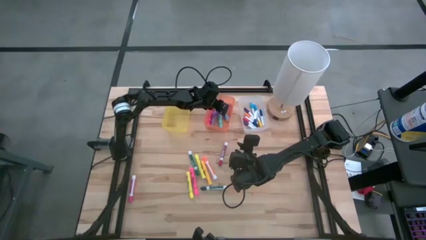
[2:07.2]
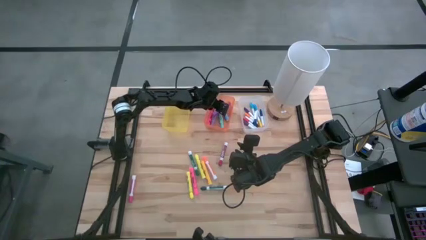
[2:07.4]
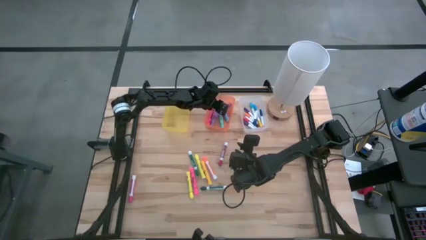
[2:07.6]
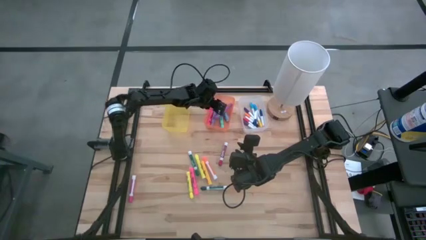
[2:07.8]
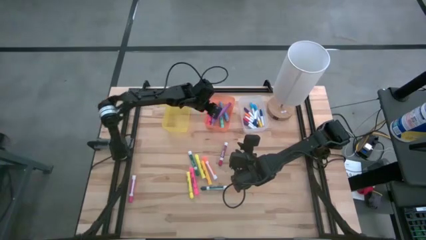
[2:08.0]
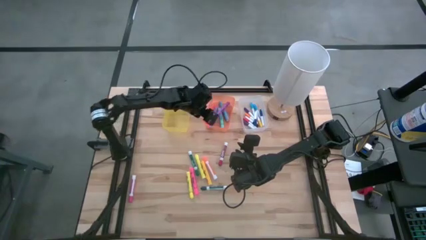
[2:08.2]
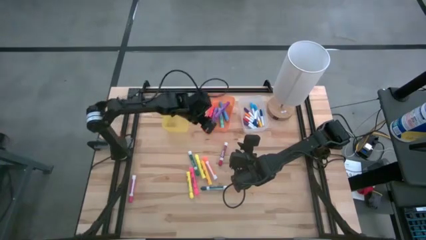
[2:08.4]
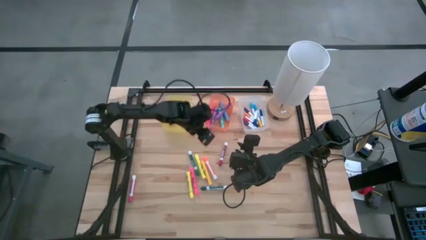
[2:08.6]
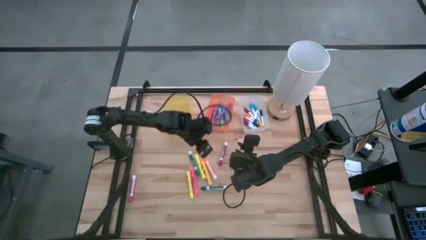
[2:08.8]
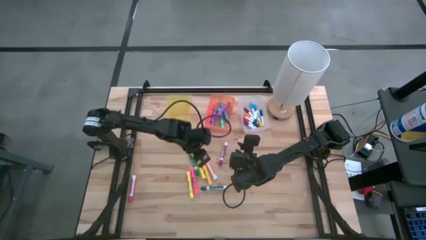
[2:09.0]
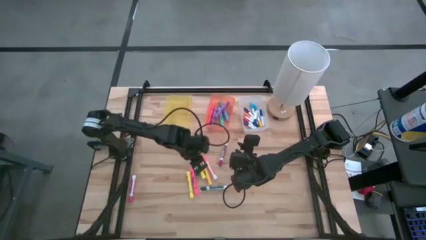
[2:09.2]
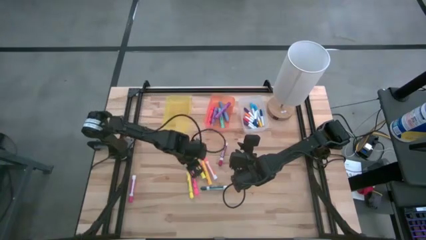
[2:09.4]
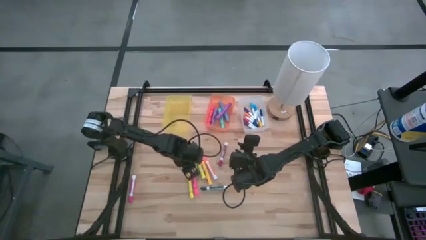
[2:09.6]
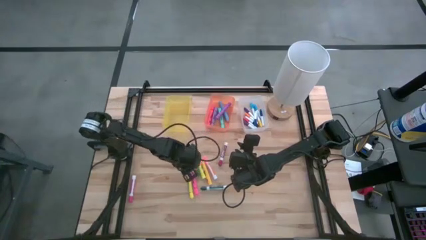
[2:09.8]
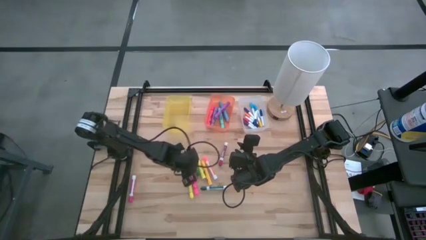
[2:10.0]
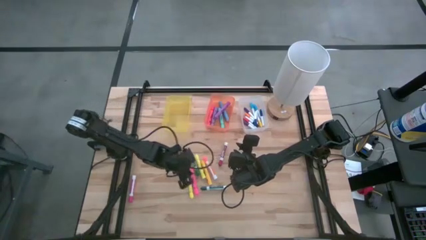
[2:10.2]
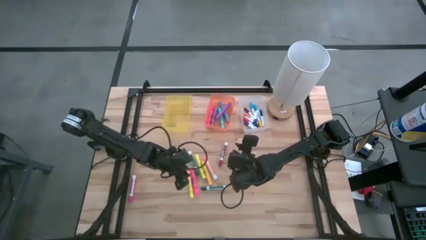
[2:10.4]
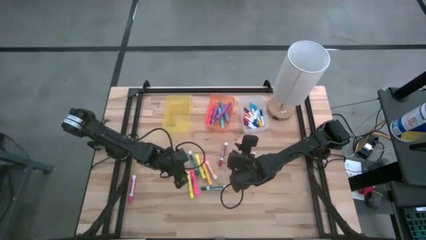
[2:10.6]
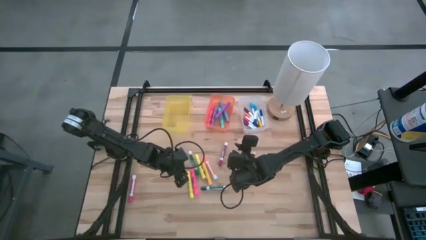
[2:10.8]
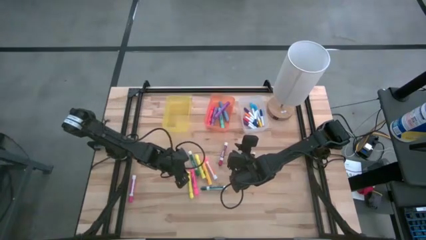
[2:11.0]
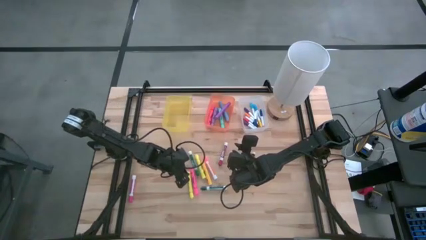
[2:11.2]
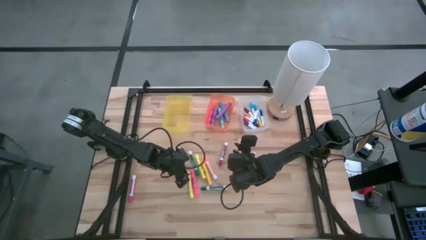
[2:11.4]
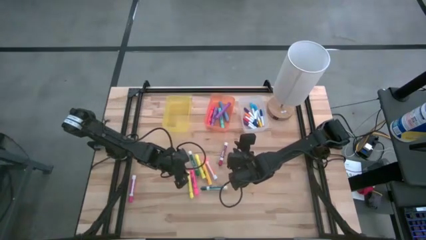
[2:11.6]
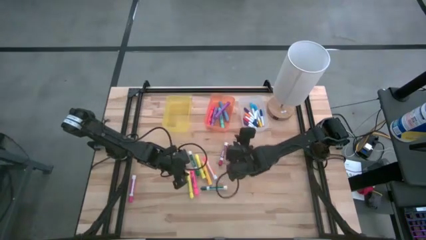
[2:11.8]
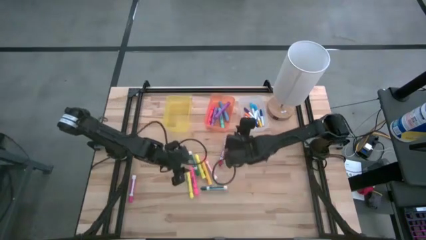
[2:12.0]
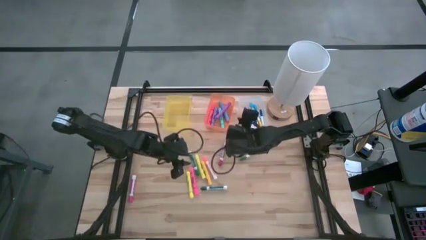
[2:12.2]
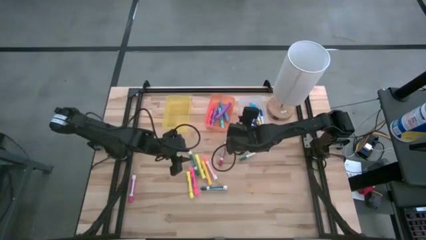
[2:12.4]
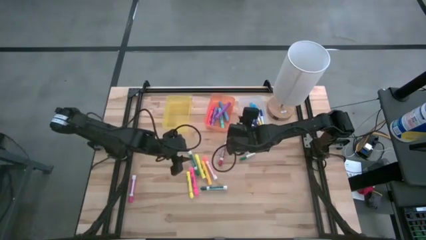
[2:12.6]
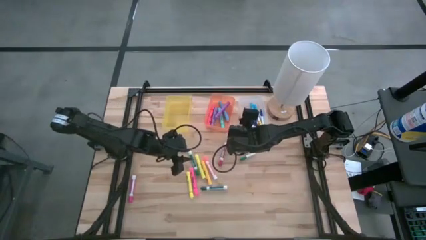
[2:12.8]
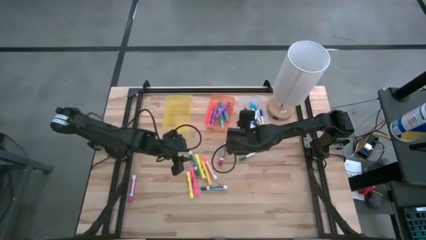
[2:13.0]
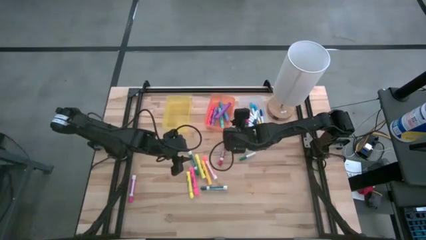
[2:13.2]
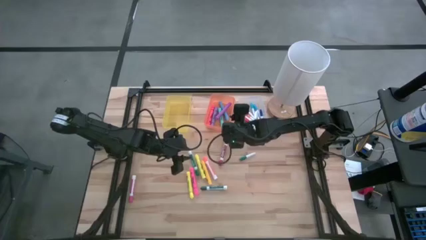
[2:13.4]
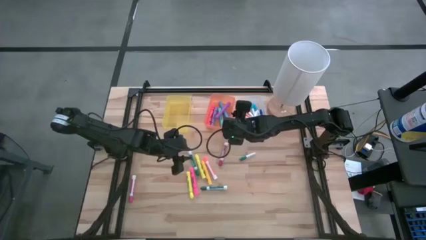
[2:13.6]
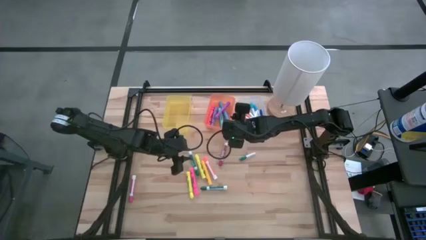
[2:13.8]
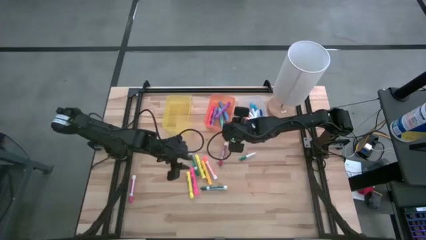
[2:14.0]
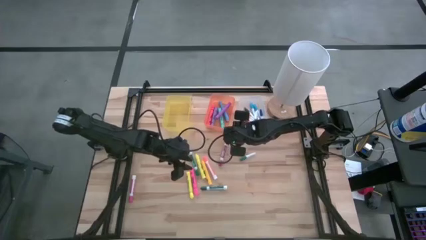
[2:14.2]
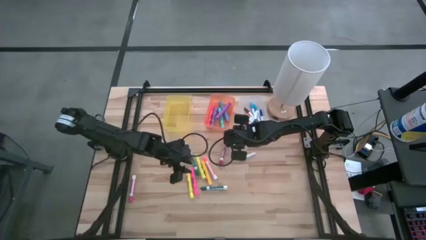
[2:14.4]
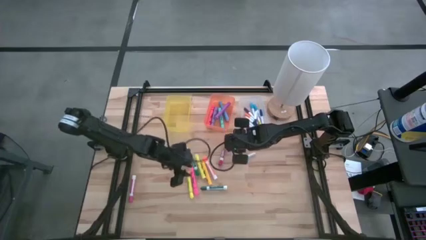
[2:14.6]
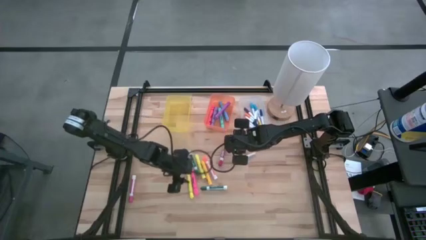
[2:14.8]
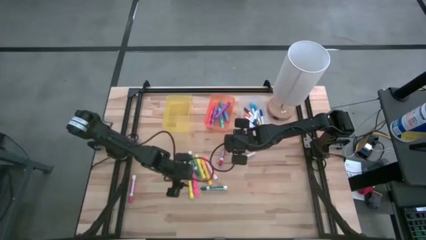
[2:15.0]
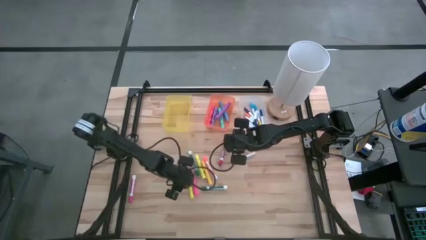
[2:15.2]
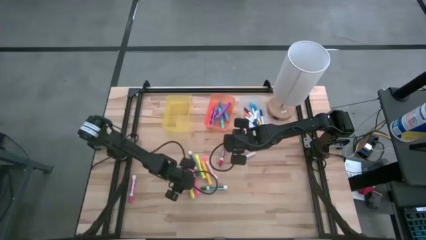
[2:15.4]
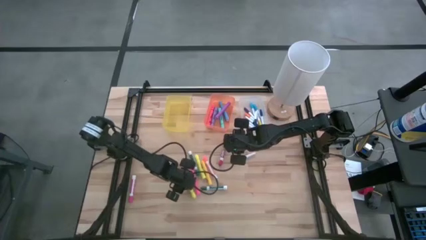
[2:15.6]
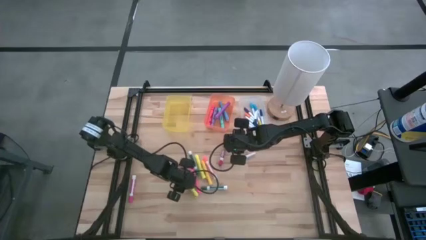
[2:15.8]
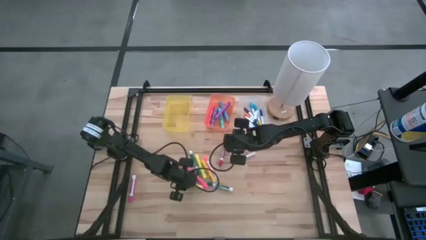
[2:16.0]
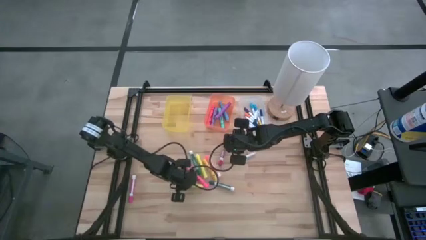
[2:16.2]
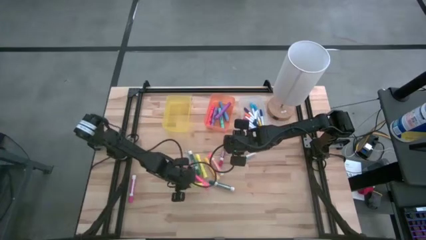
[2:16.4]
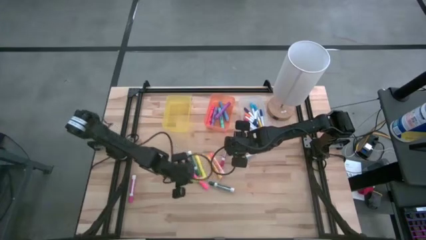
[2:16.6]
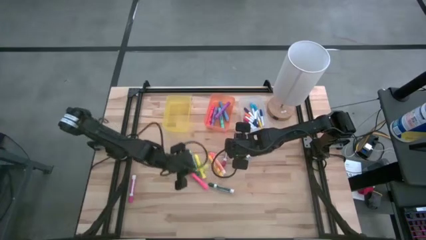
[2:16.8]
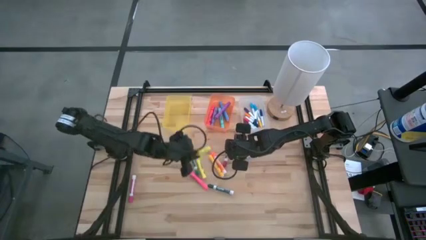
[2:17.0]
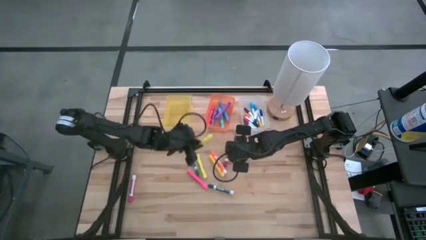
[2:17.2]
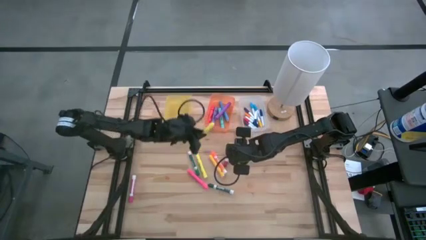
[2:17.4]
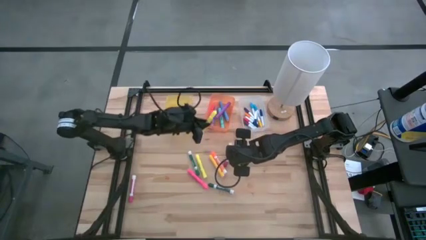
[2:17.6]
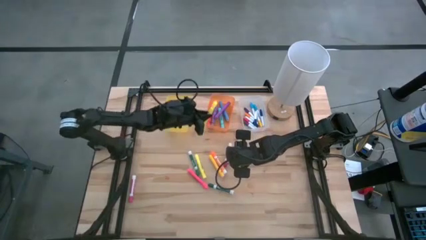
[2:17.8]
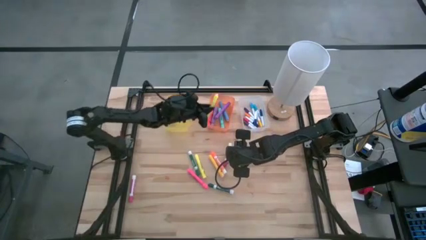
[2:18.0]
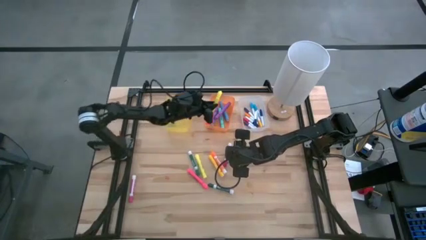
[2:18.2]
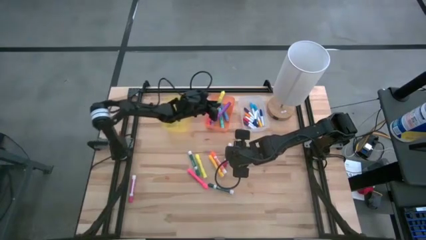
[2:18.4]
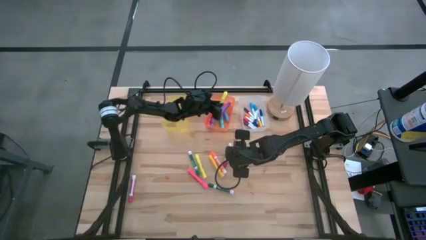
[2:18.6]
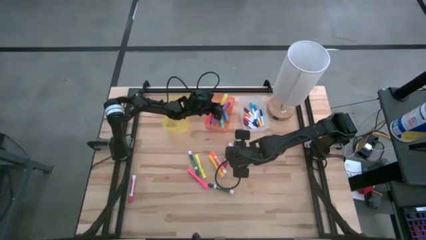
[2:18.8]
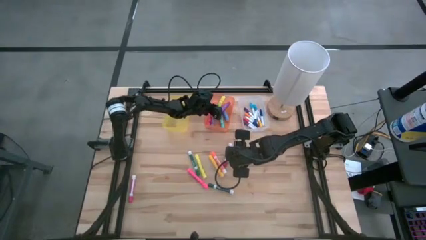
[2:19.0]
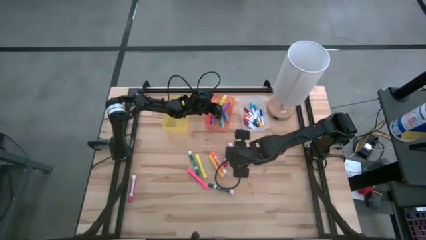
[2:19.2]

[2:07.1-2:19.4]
Task: Pick & Place Markers
Put the left yellow highlighter into the orange bin

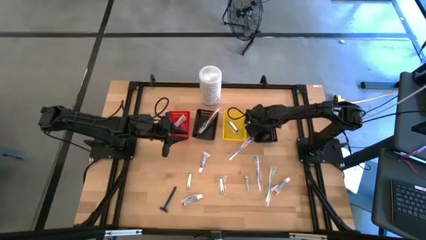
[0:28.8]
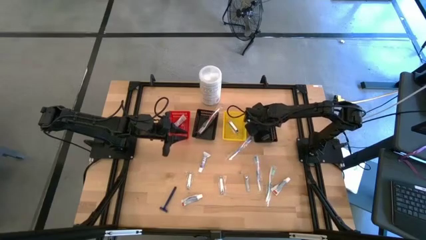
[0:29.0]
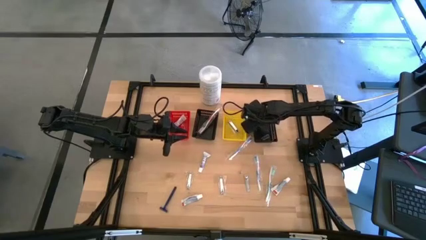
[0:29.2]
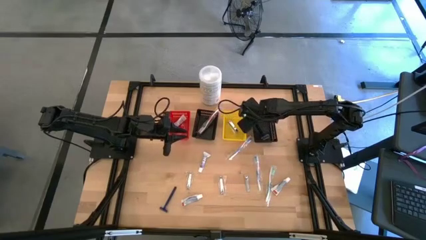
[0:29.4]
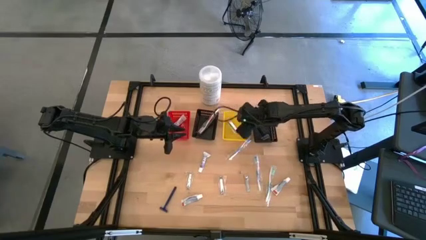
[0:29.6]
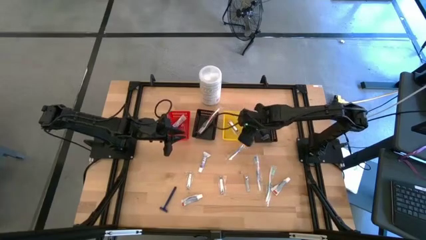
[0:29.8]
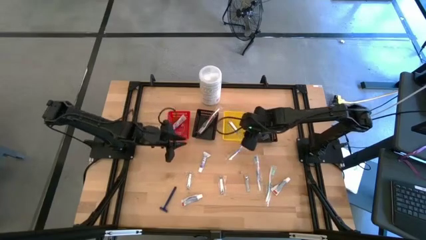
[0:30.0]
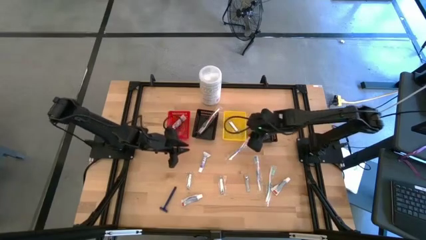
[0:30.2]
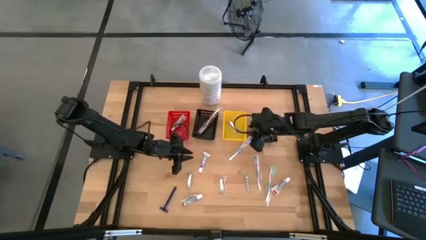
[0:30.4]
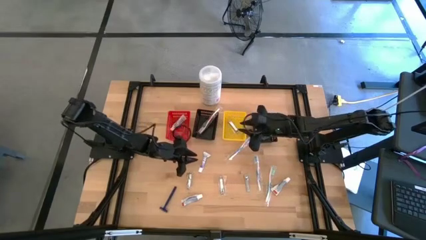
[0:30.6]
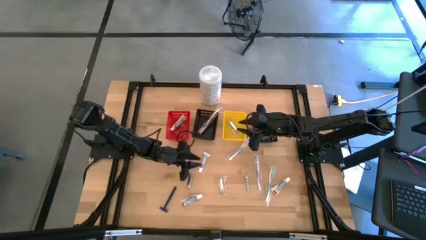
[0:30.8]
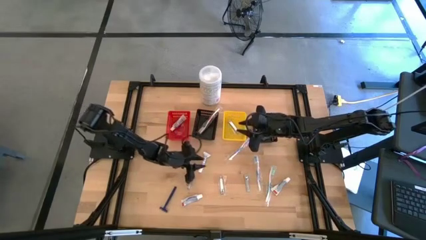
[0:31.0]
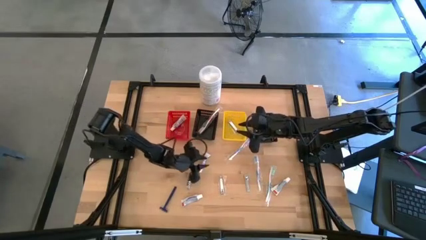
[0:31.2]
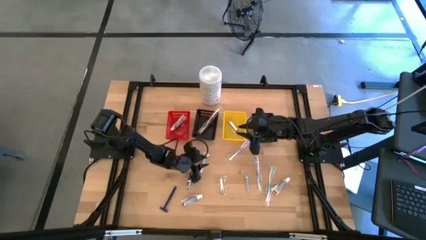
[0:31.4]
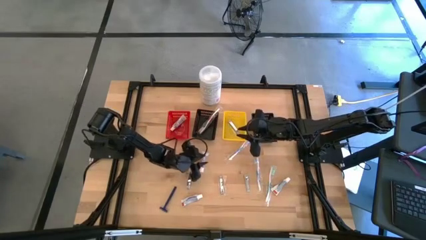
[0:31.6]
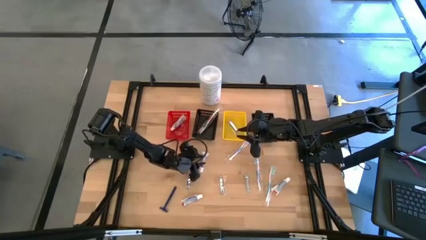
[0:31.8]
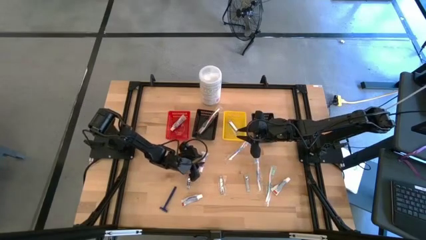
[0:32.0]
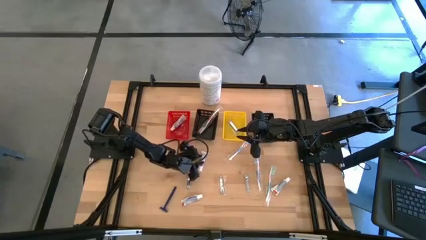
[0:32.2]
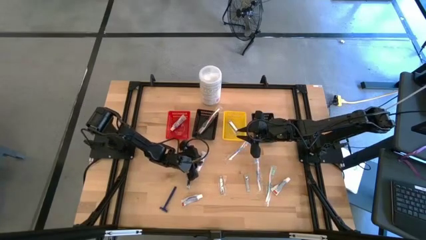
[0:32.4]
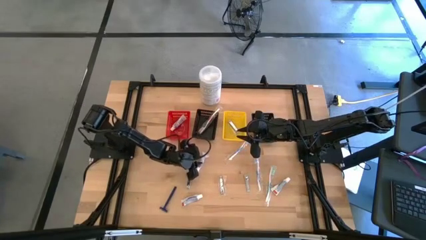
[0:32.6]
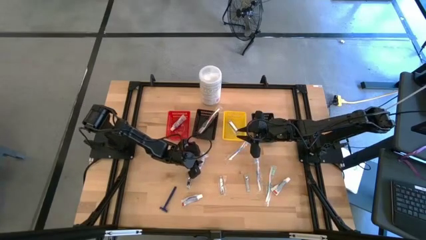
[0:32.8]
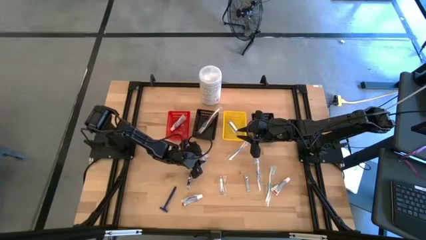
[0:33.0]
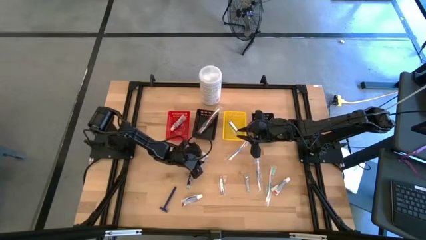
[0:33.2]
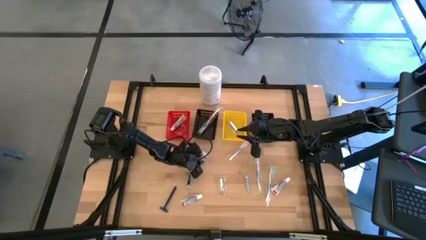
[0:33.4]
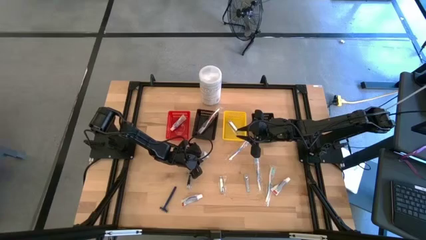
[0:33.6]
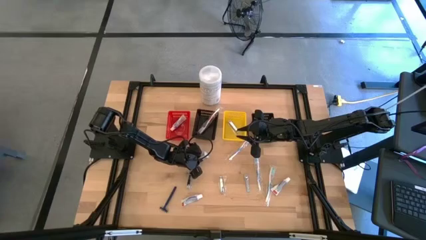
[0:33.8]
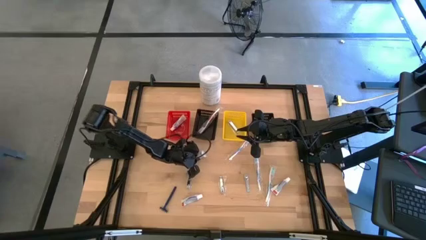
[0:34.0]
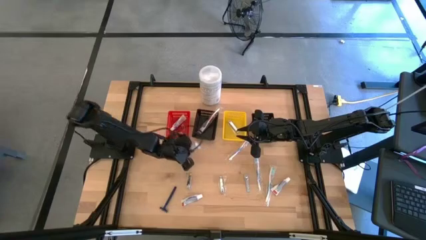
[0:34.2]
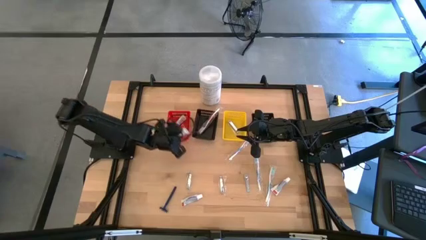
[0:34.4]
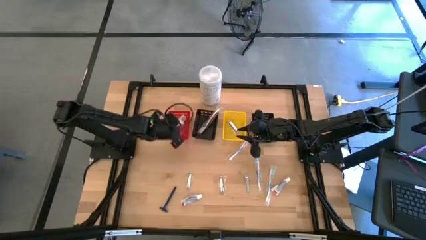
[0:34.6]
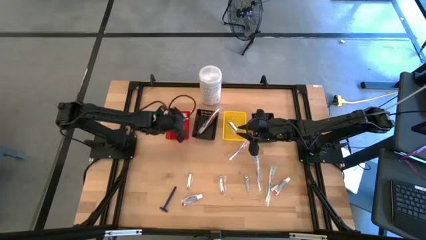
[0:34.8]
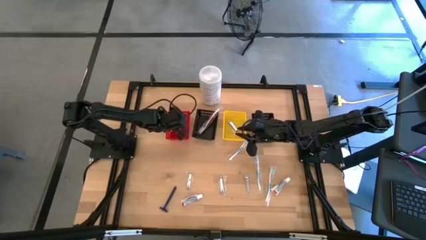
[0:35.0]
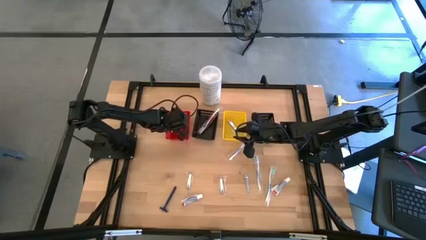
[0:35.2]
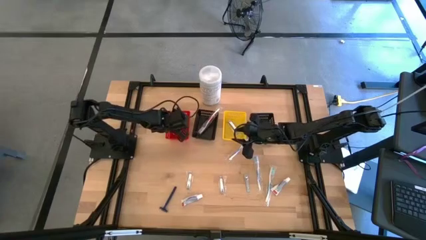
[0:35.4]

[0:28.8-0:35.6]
Task: Pick & Place Travel size toiletries
Put the toothpaste into the red basket
